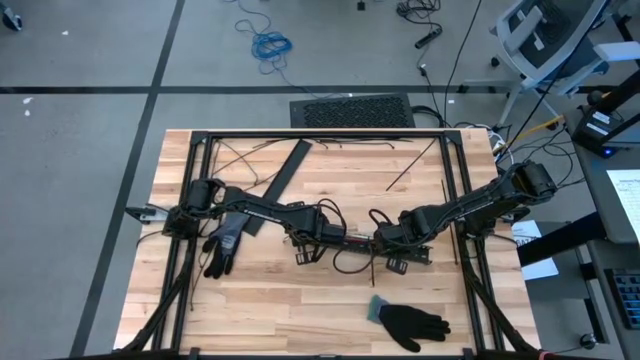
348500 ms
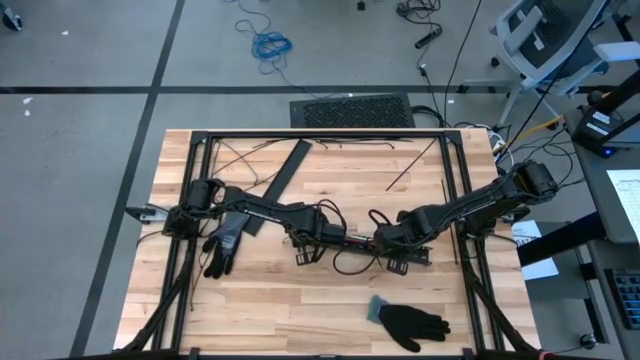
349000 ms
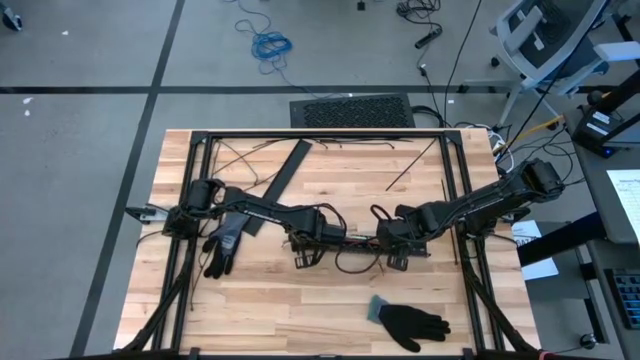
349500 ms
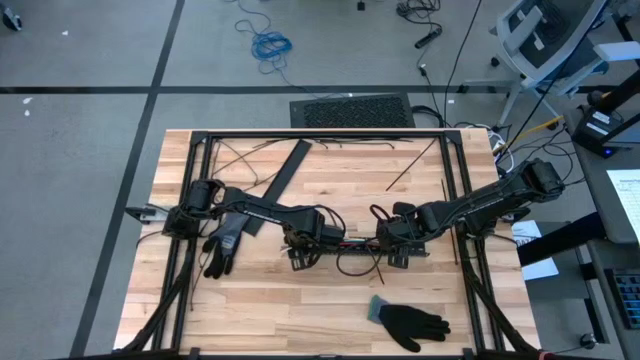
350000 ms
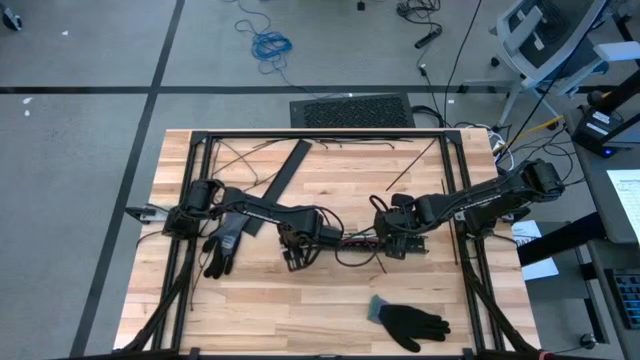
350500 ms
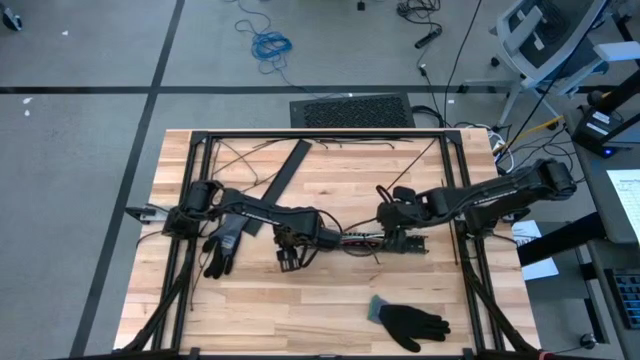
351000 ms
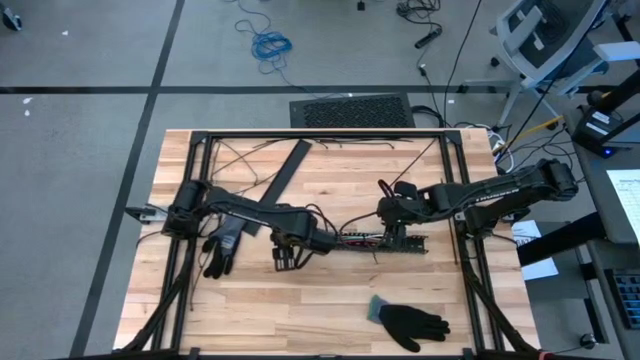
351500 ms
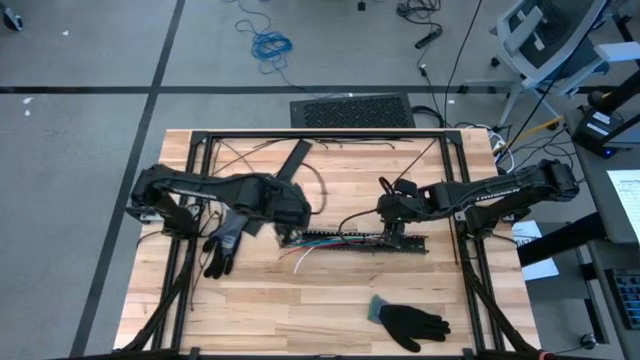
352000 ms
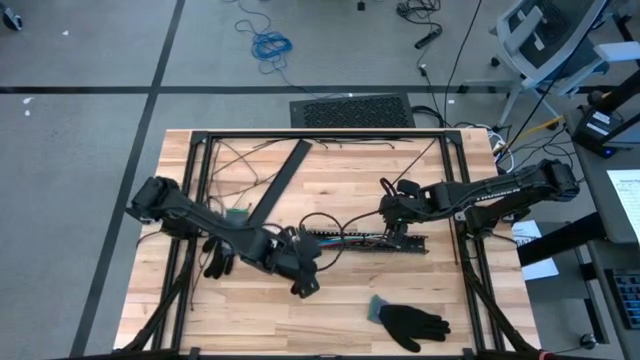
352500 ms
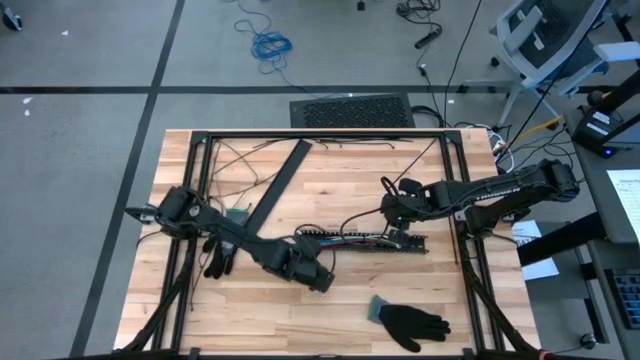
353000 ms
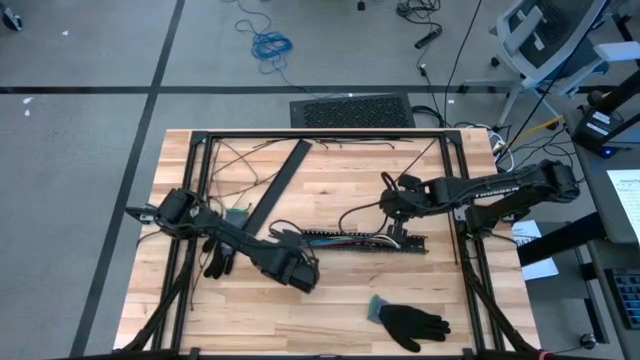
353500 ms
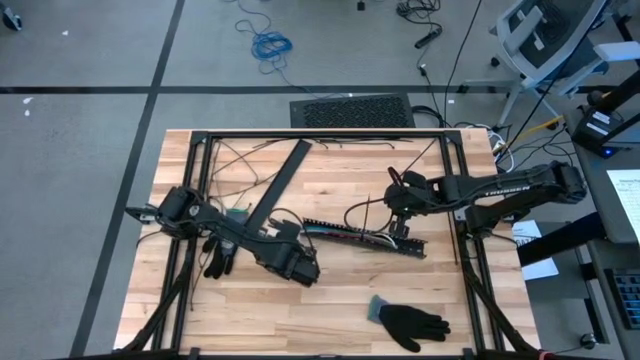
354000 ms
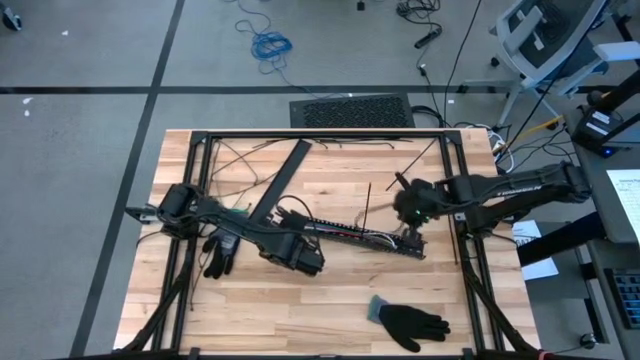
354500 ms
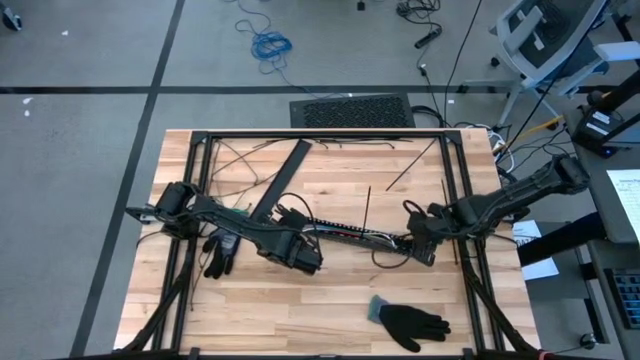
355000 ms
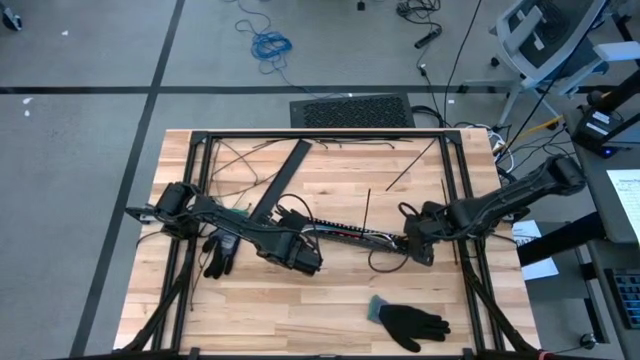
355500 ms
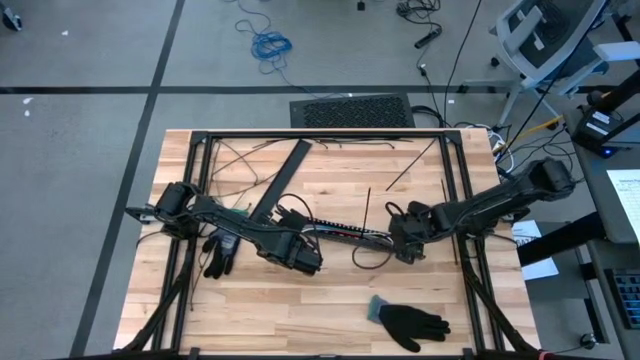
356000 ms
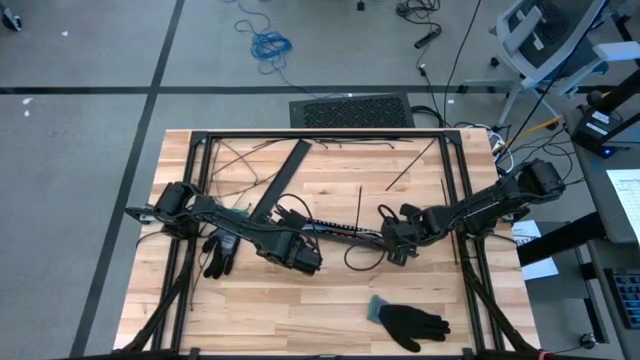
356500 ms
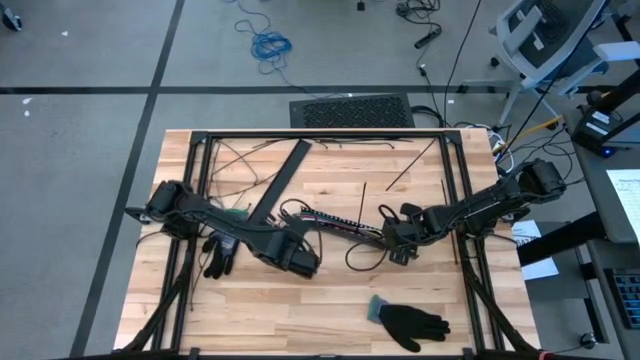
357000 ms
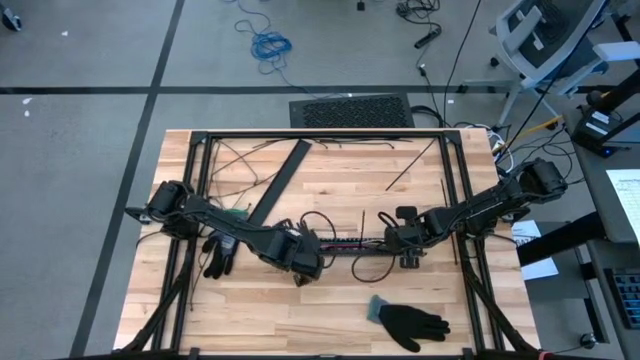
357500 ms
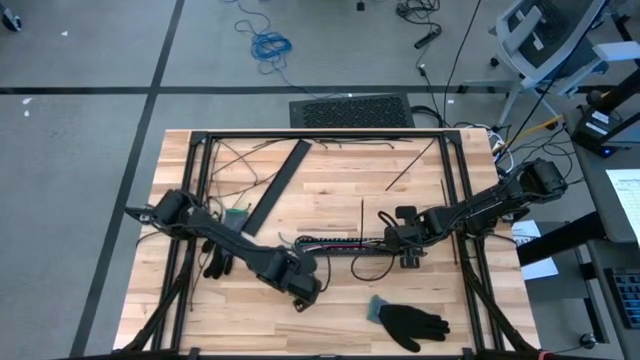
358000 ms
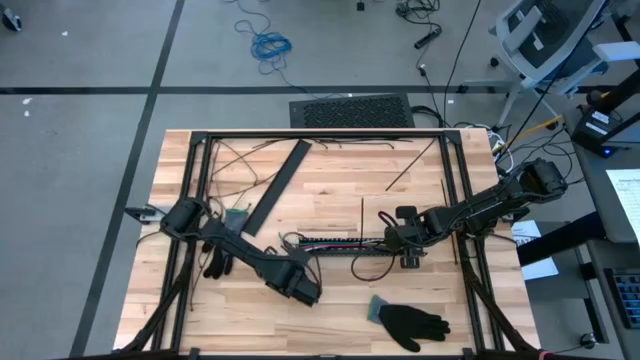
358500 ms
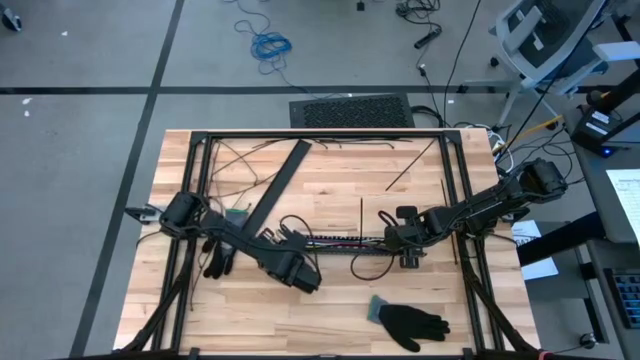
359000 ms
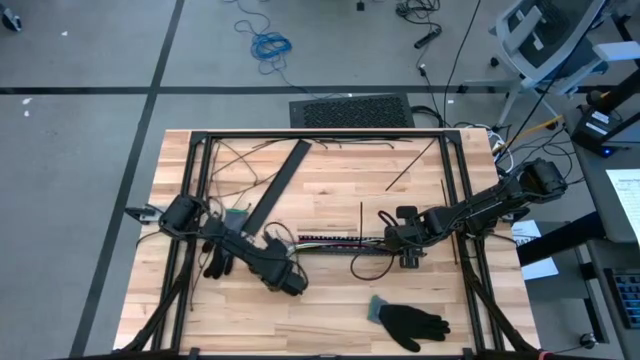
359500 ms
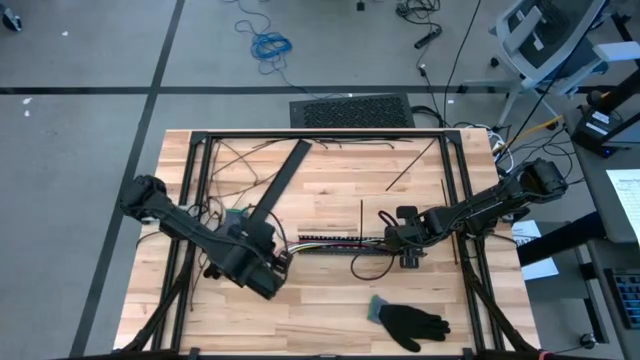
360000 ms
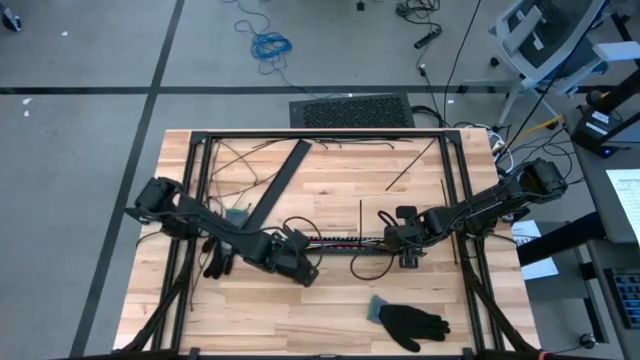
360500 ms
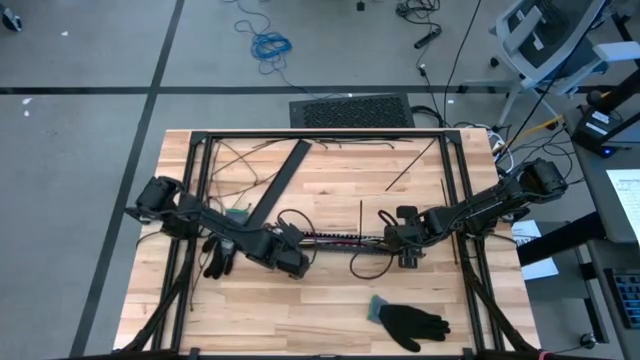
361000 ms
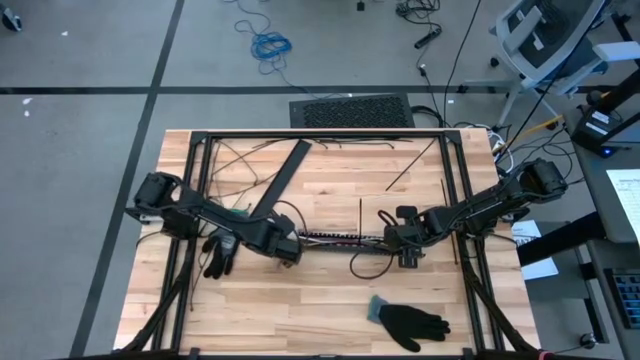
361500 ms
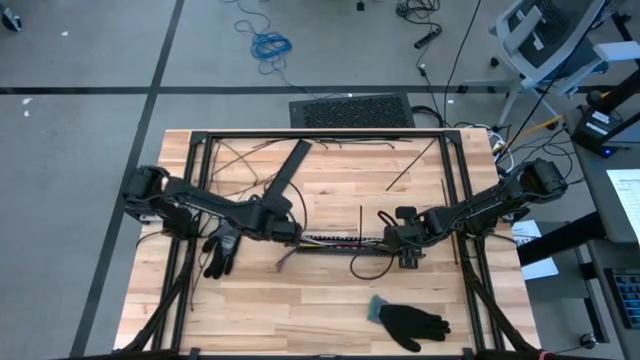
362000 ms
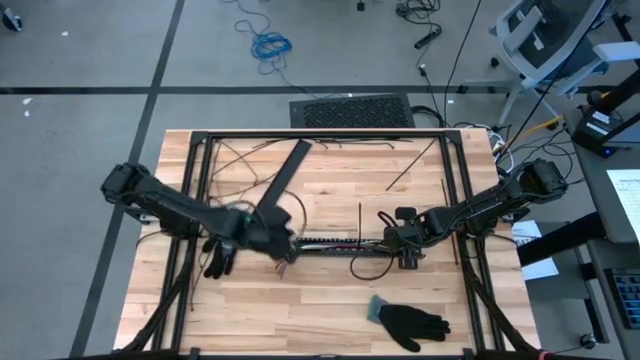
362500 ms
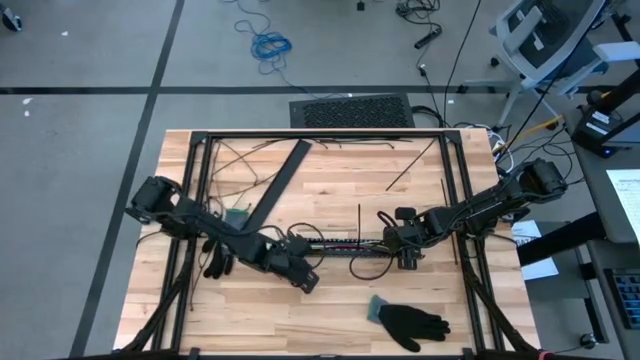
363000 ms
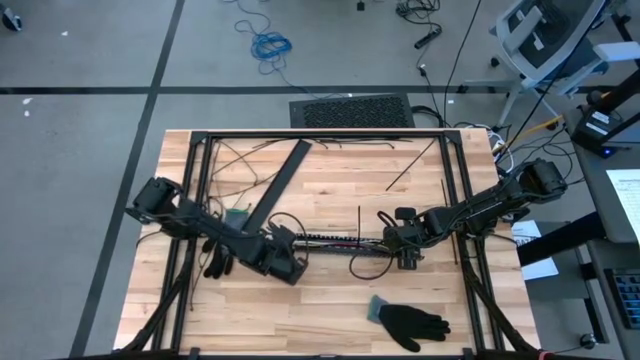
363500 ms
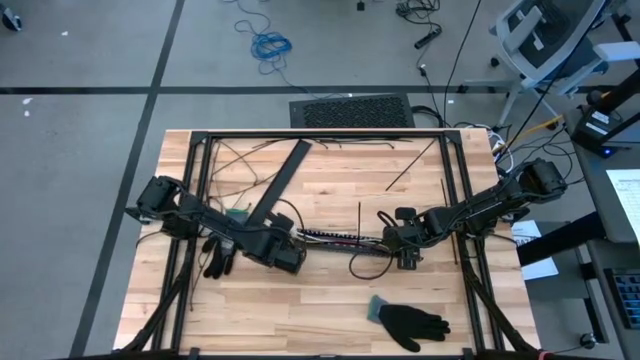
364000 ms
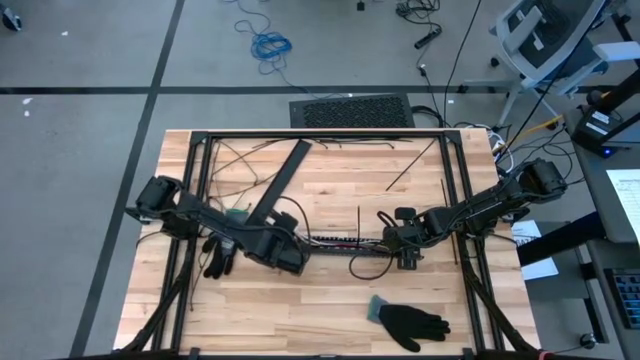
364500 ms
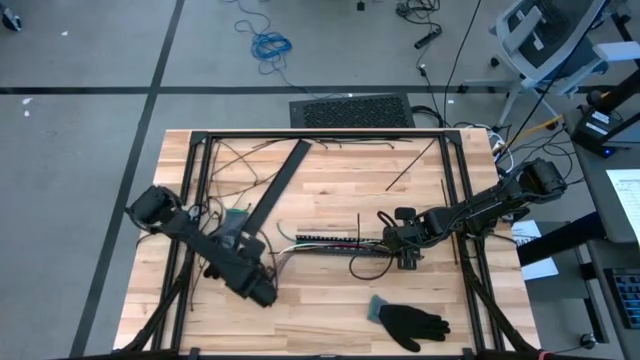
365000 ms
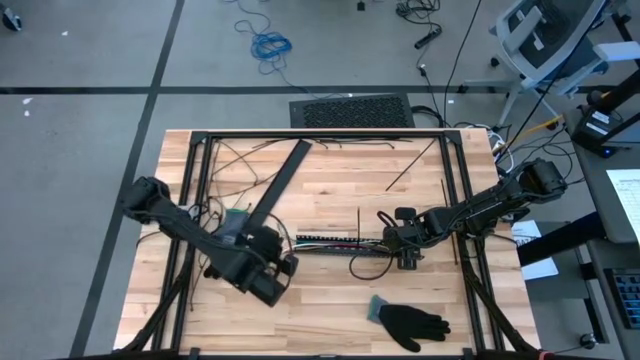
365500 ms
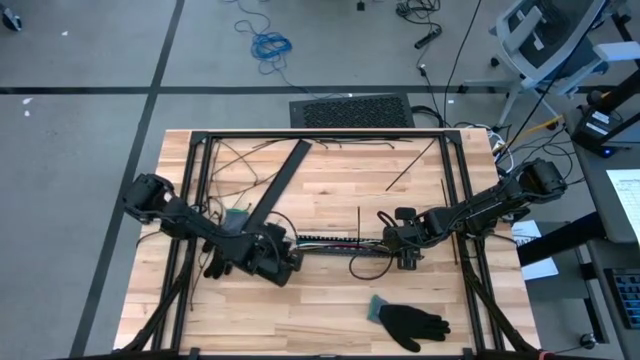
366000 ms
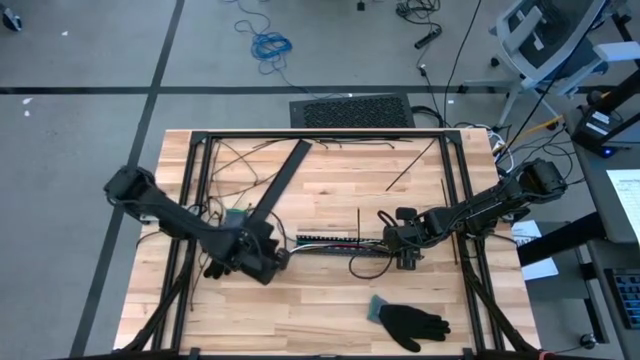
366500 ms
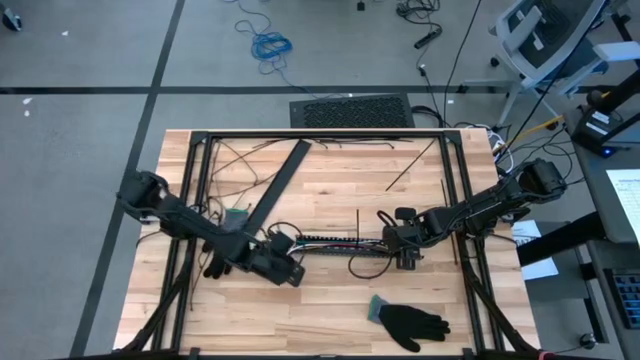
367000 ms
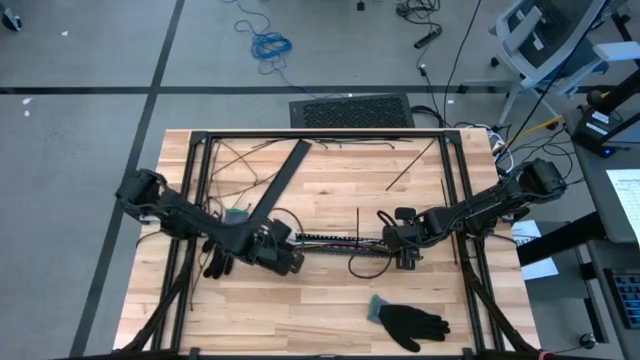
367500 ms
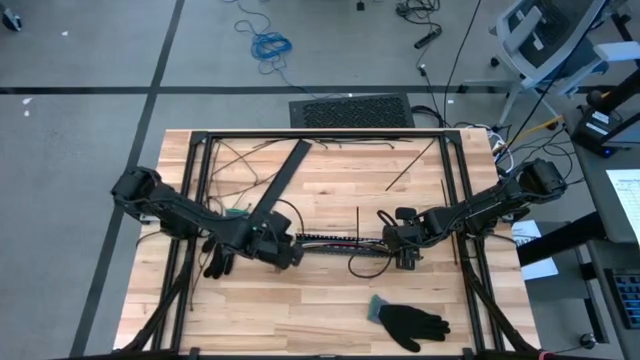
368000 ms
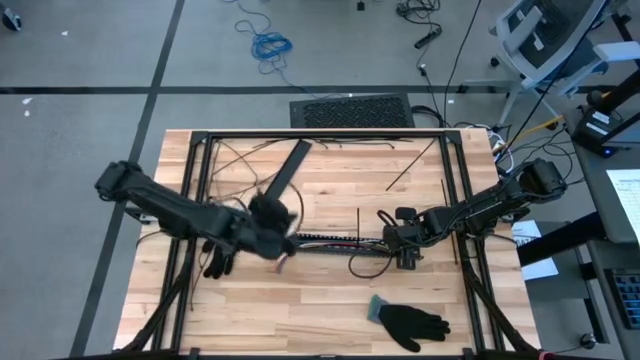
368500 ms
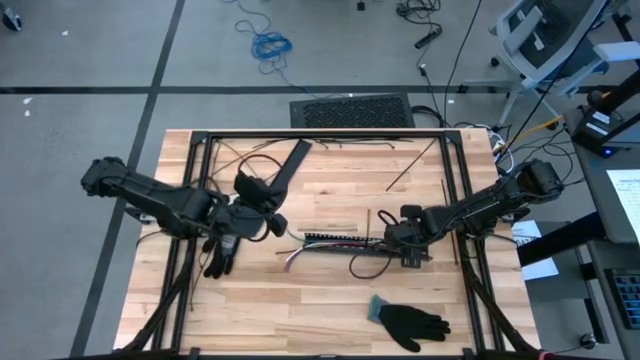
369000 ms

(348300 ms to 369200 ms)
Task: Ziptie cables
Put the ziptied cable wires into the cable duct
